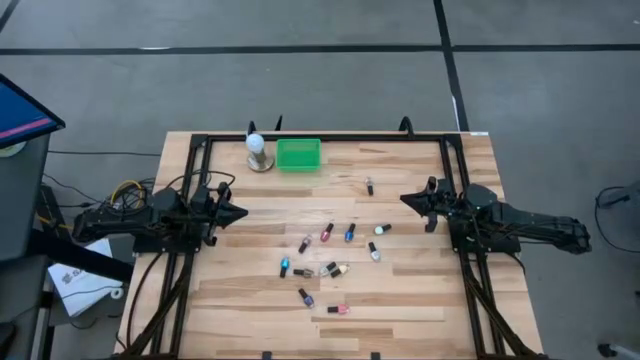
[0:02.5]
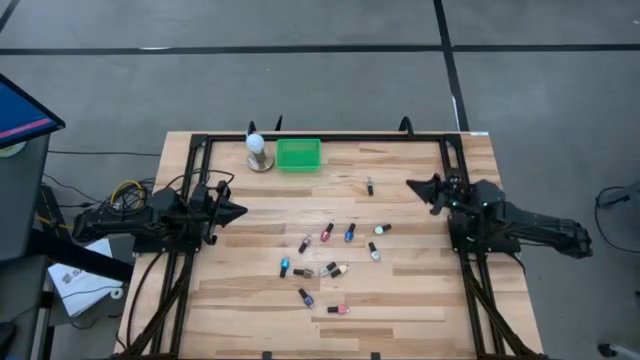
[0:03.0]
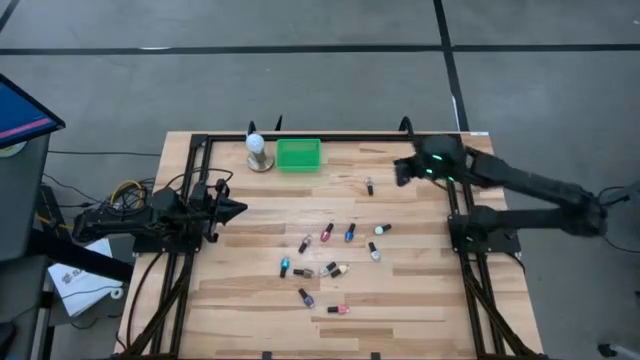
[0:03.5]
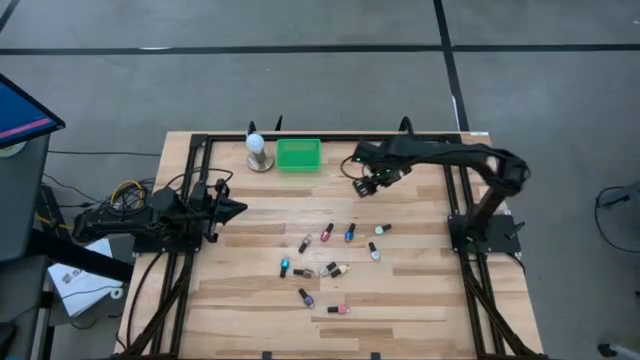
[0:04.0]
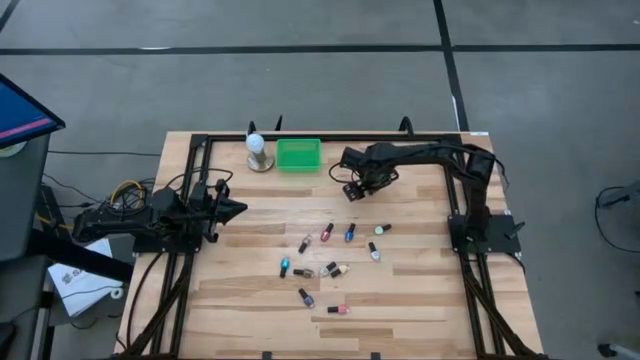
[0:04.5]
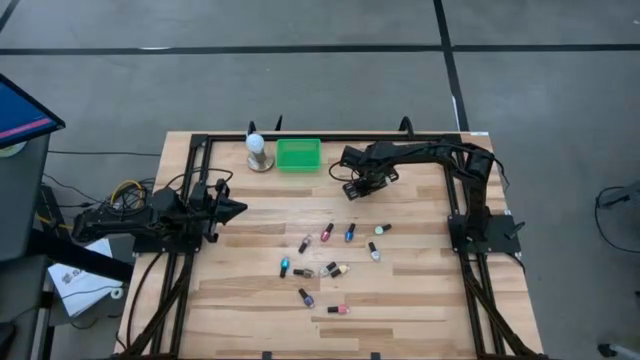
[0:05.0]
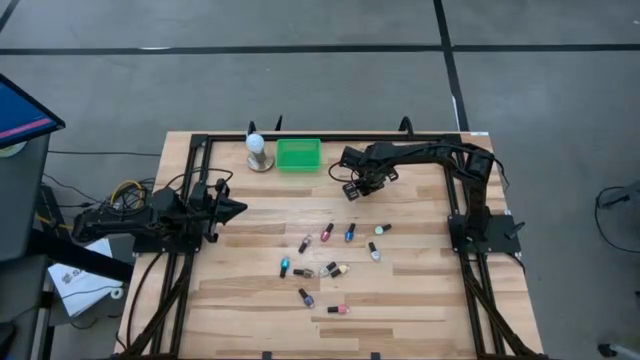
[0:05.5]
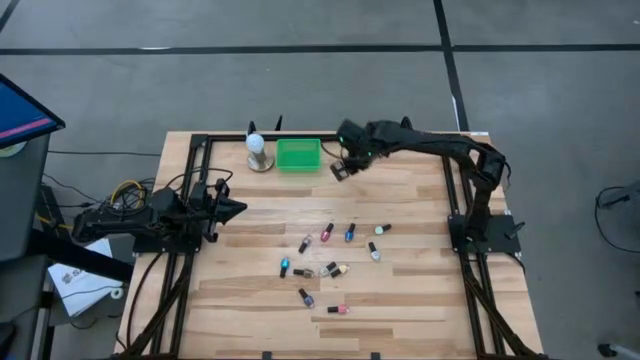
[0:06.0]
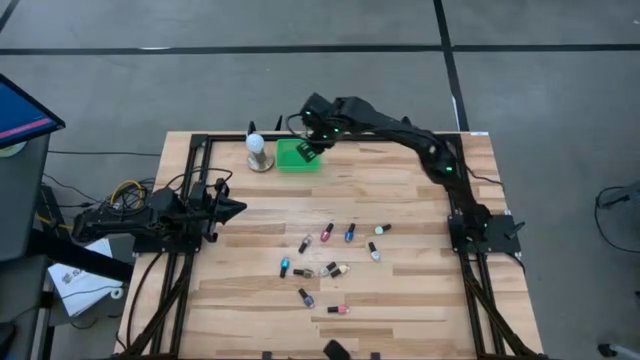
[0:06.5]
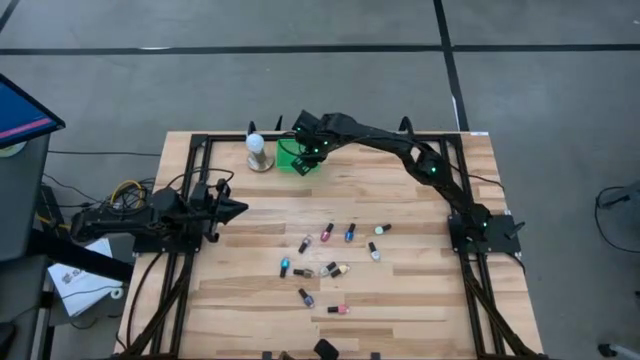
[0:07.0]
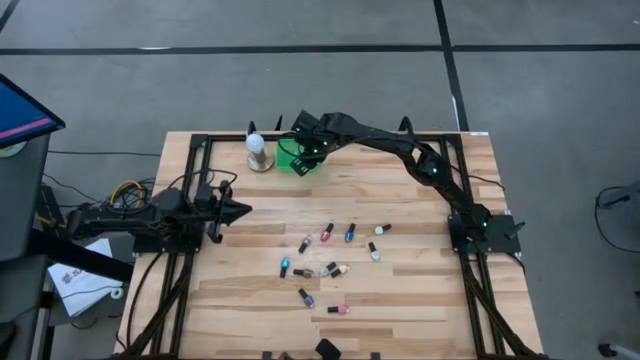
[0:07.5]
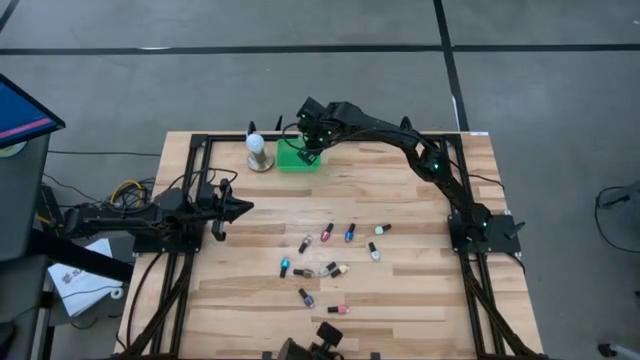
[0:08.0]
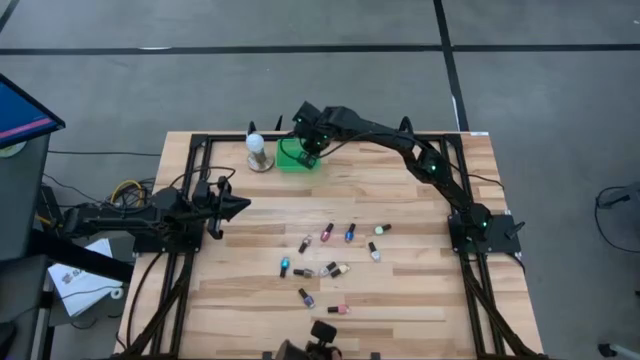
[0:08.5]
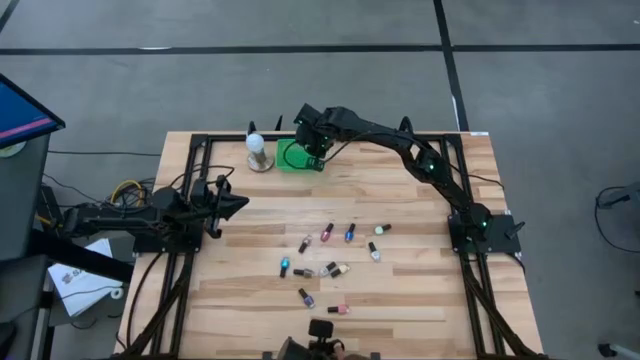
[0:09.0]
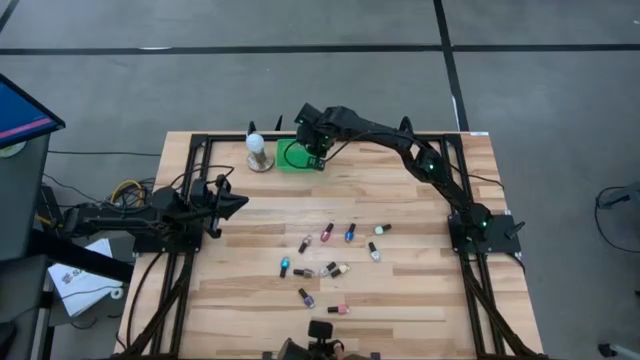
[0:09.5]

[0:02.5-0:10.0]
Task: Pick & Place Nail Polish
Put the top clear nail polish into the green bin

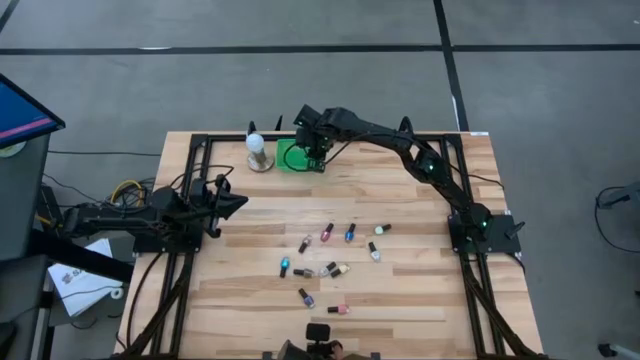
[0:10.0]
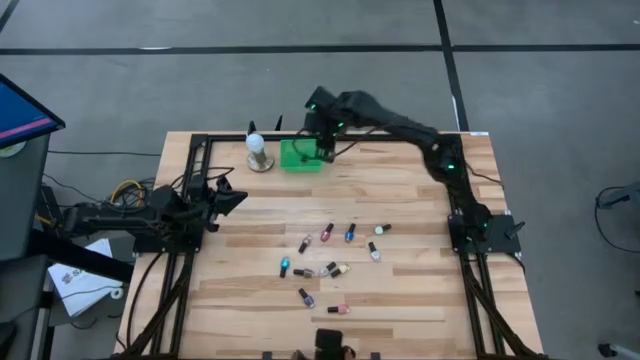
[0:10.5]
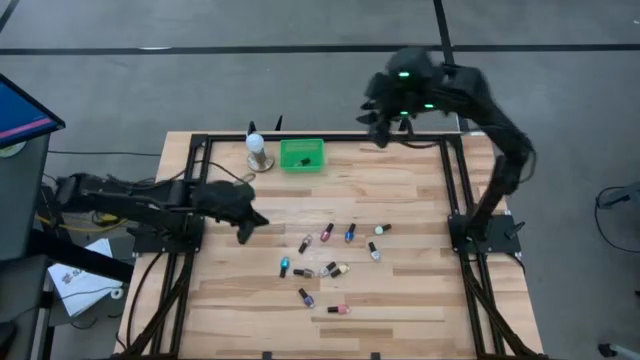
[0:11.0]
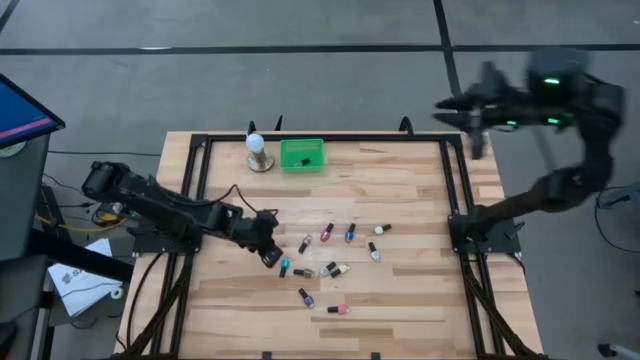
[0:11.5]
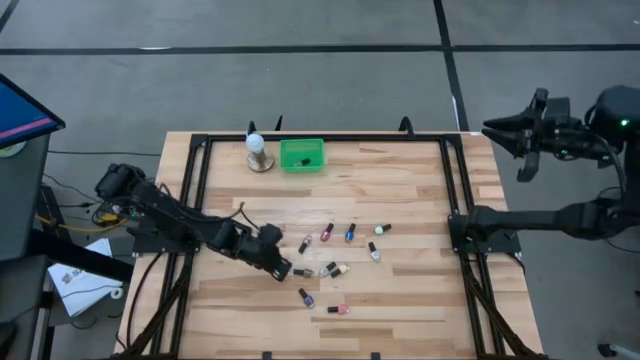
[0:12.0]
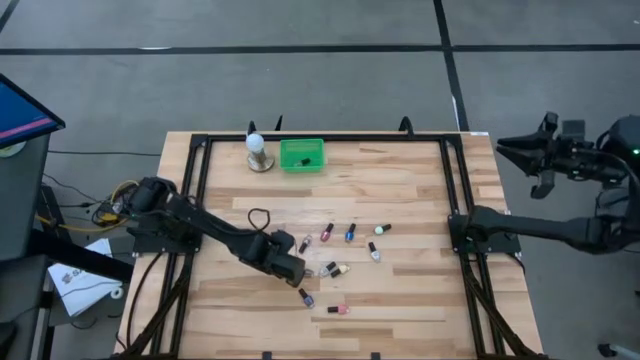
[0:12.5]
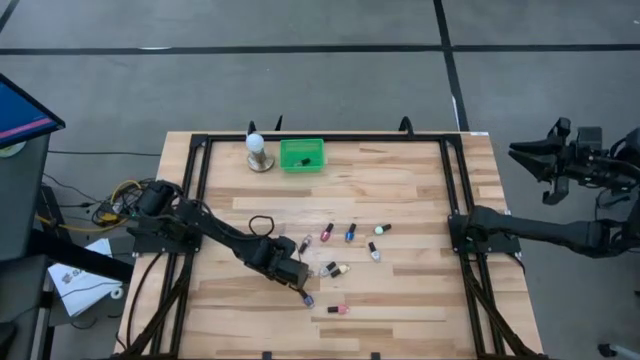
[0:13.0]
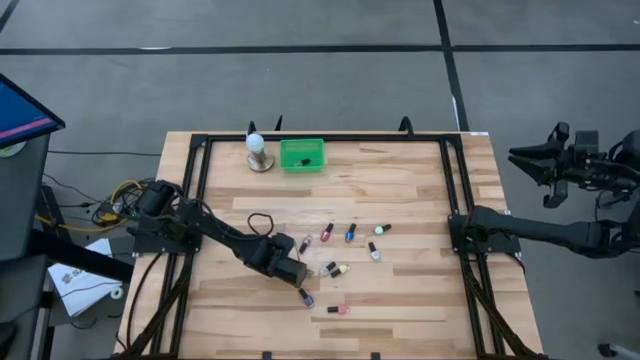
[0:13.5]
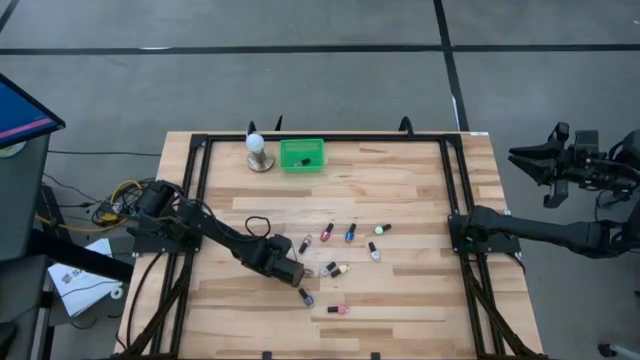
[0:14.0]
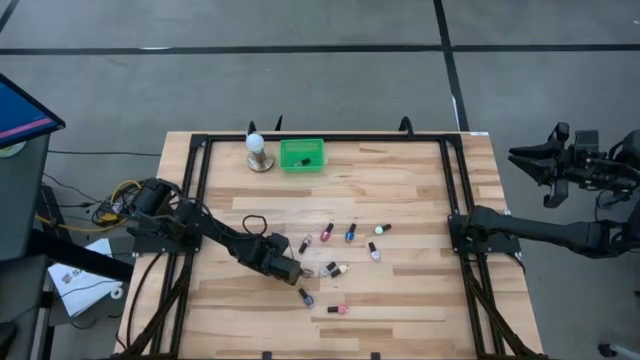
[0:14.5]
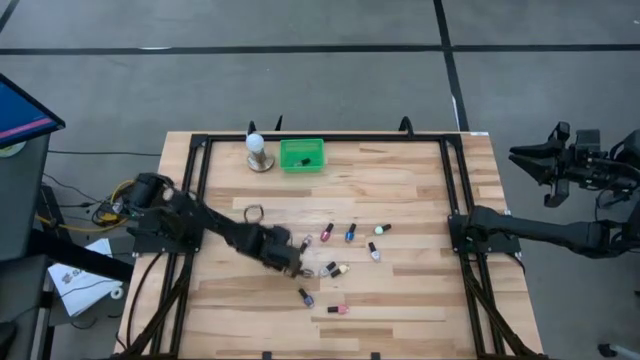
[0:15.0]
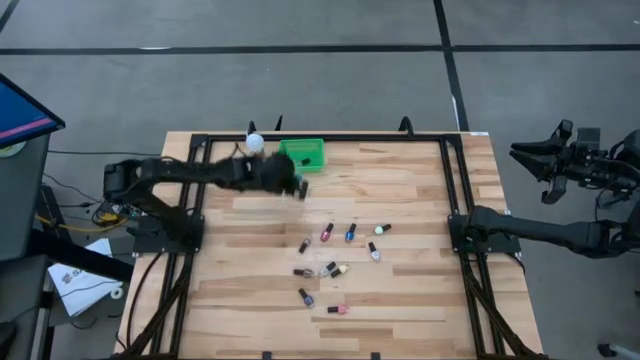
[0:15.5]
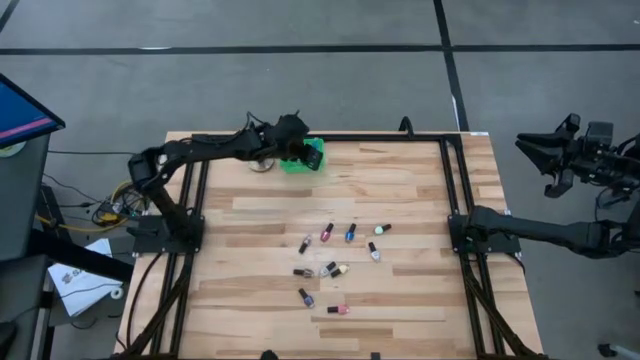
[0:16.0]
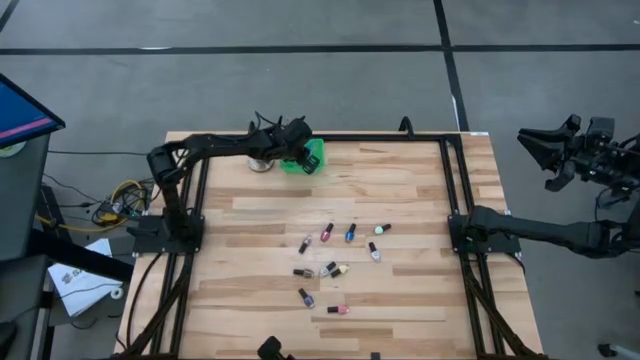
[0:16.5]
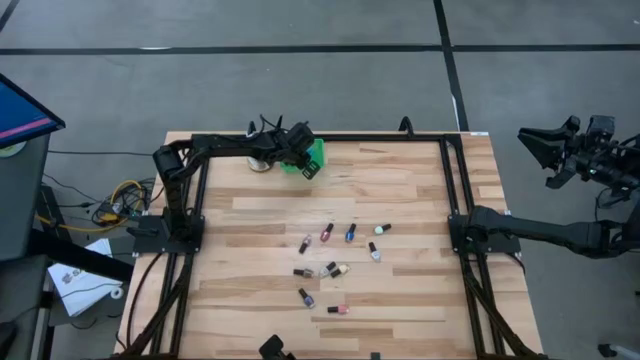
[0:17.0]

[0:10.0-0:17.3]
Put the light blue nail polish into the green bin

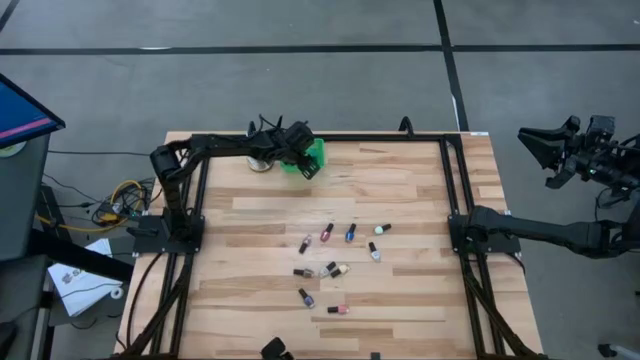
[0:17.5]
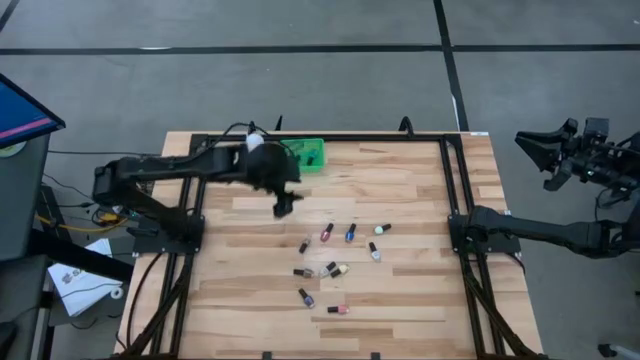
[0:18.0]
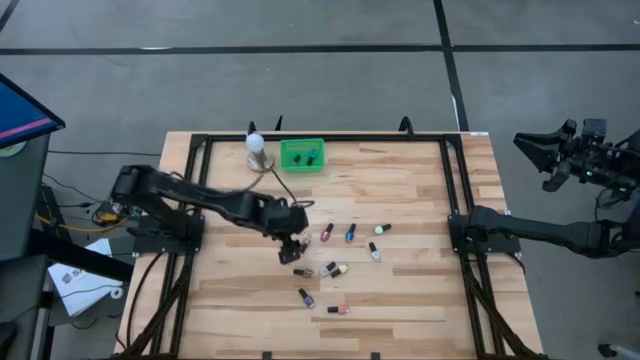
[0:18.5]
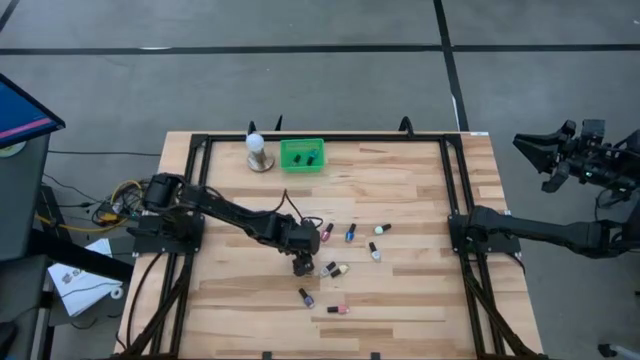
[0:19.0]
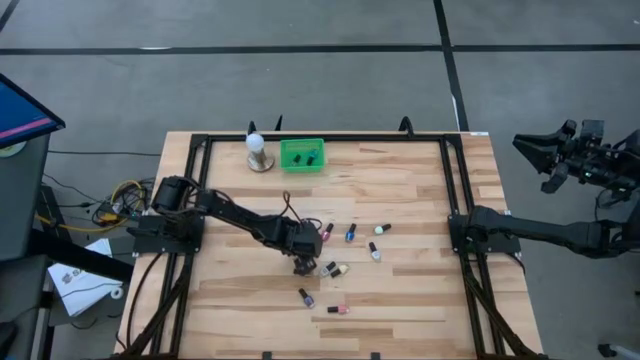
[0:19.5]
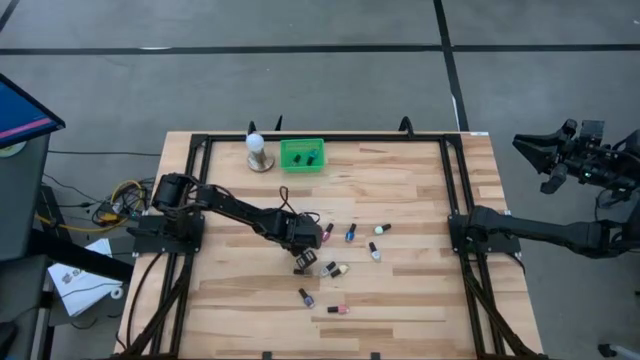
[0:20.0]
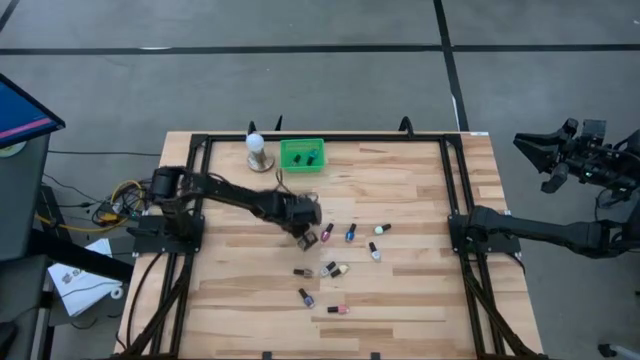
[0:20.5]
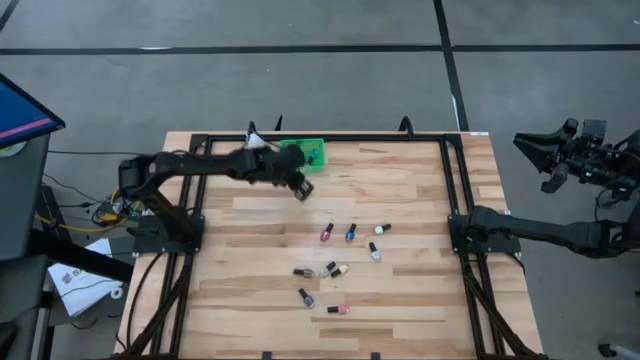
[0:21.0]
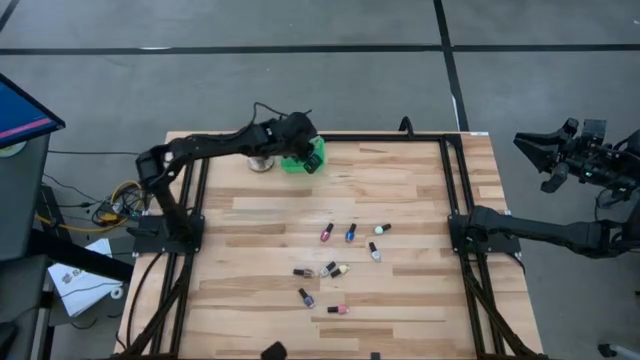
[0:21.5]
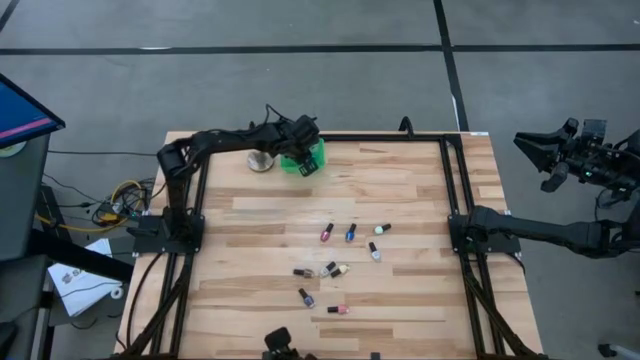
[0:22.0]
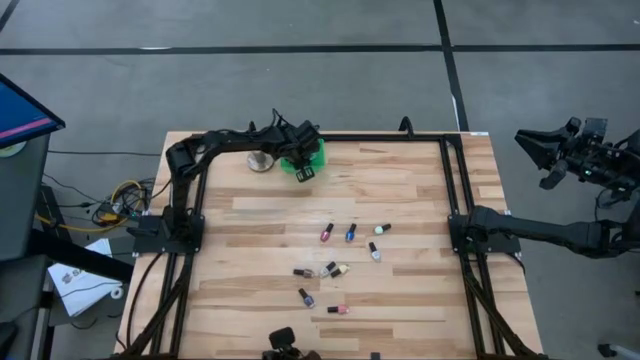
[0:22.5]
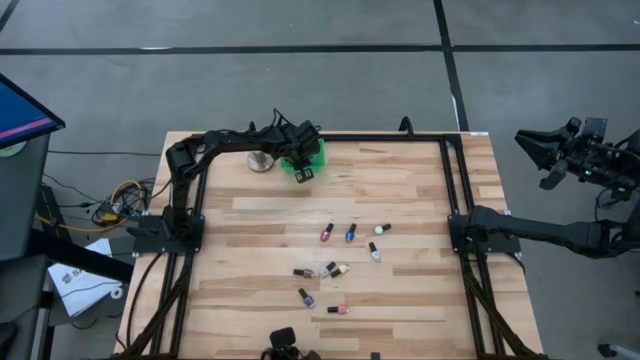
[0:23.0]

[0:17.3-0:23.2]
Put the clear nail polish into the green bin
